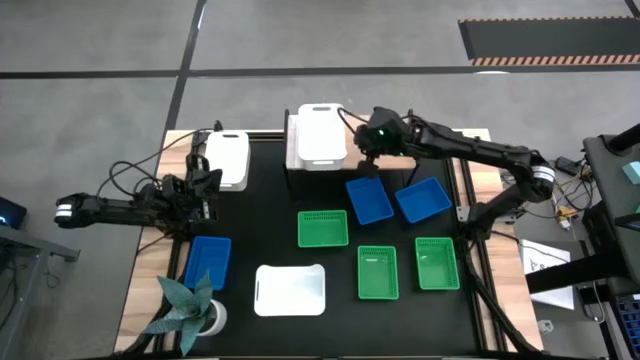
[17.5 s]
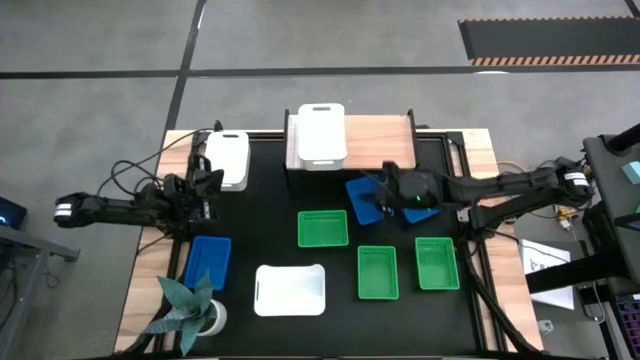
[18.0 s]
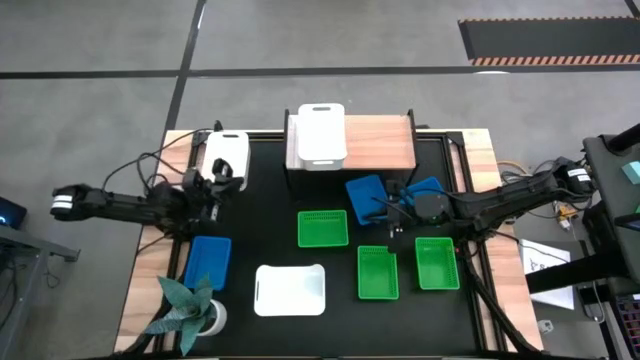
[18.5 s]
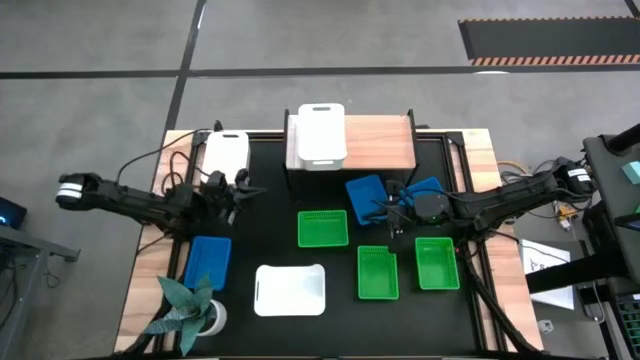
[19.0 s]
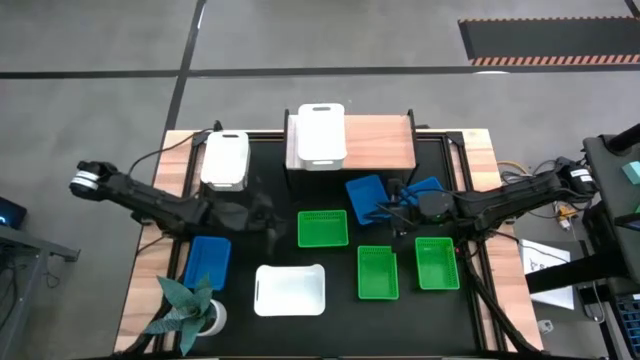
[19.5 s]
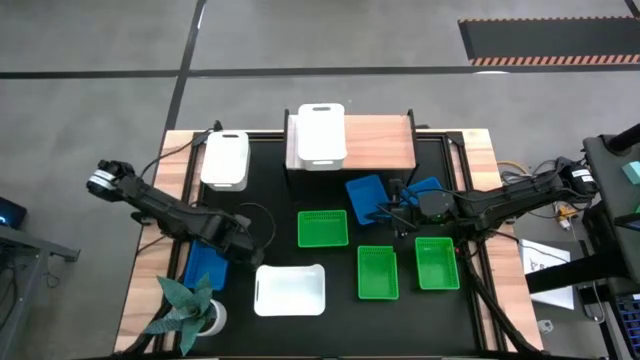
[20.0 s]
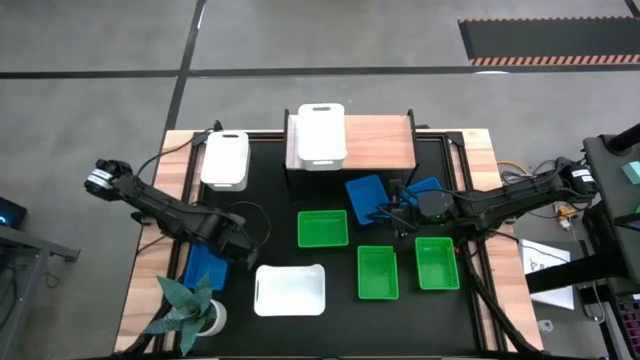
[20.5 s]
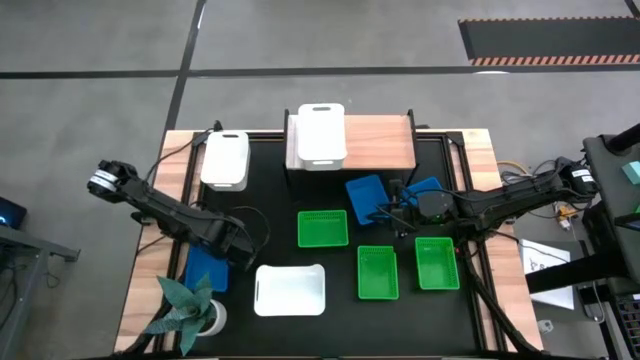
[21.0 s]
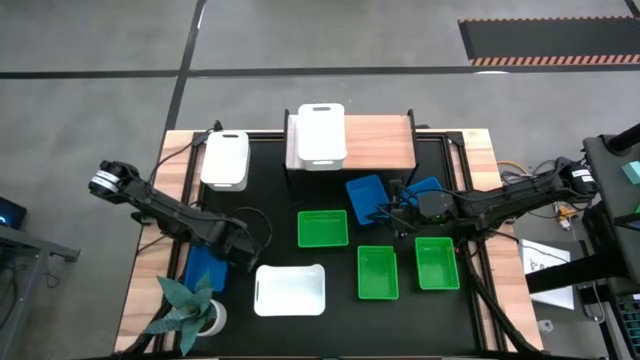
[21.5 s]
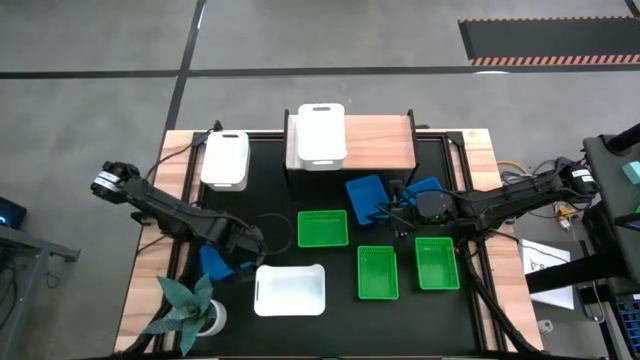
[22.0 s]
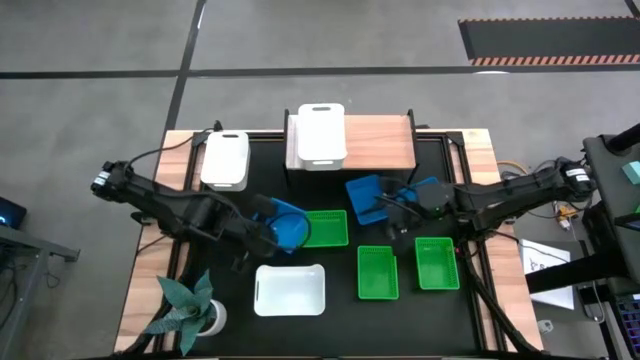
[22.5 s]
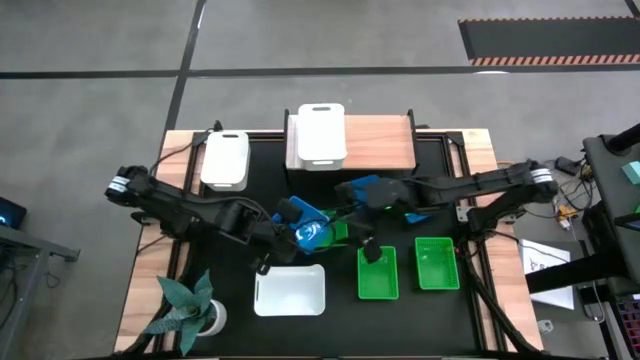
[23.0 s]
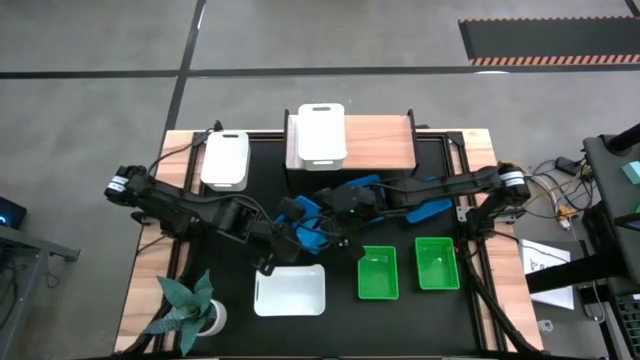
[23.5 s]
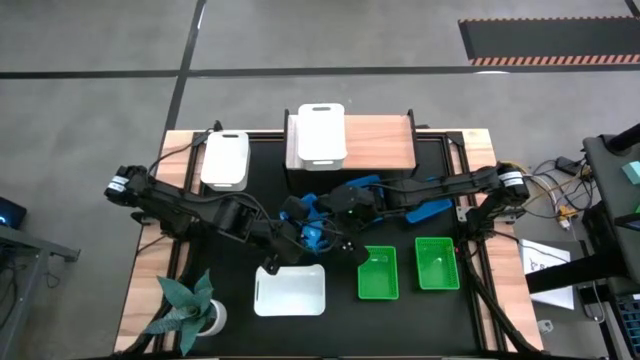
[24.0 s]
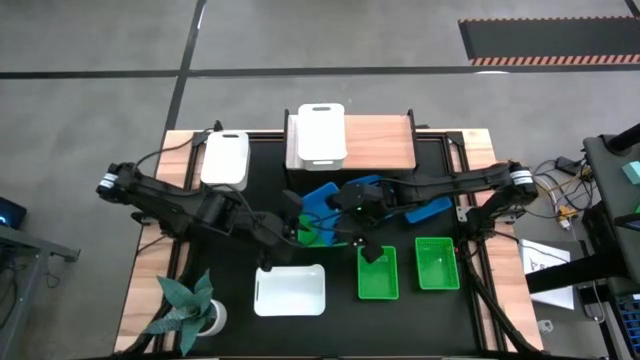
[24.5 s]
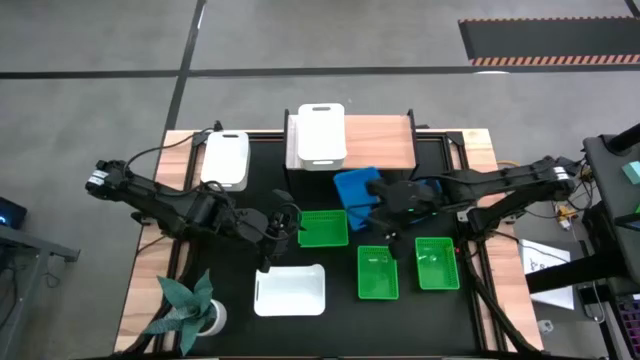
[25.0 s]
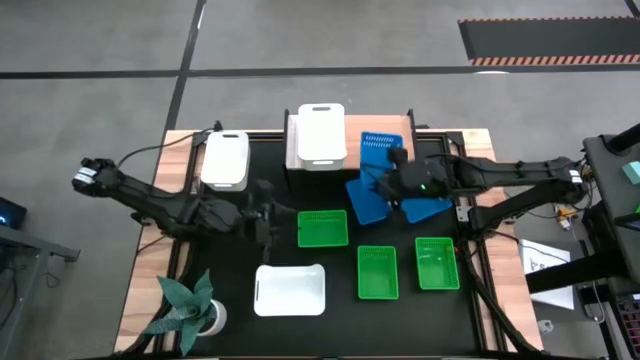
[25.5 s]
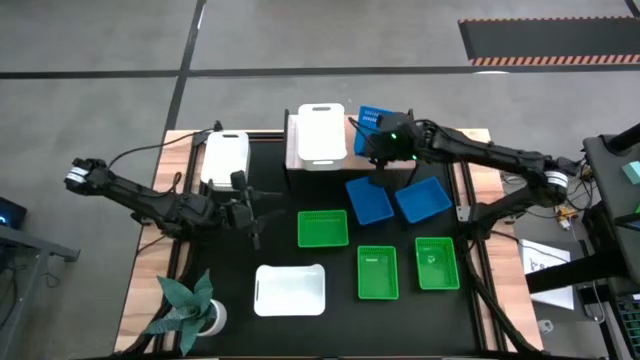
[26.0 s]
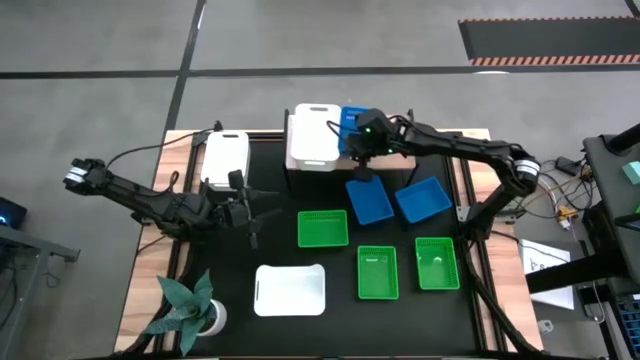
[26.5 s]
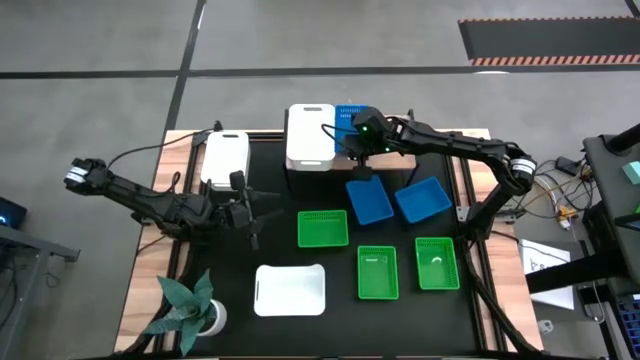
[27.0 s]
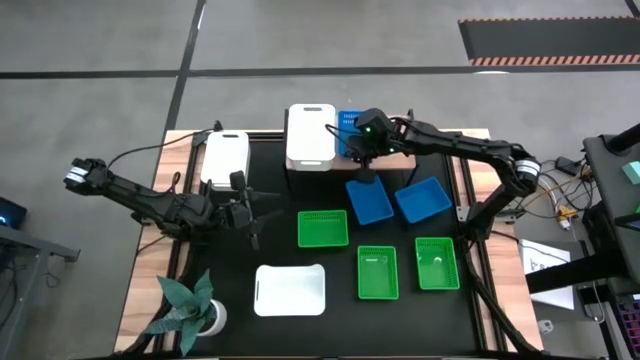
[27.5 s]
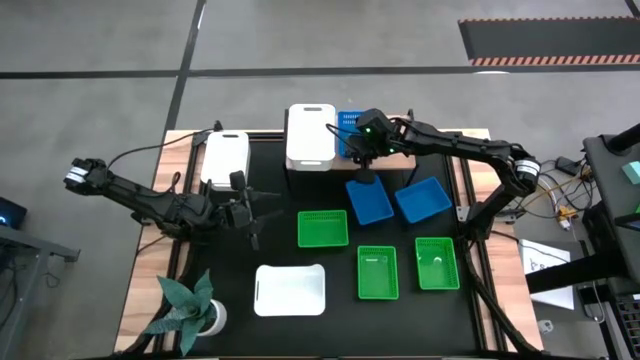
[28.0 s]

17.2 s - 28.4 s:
Task: Stack baskets on shelf by color
Put the left blue bin on the shelf

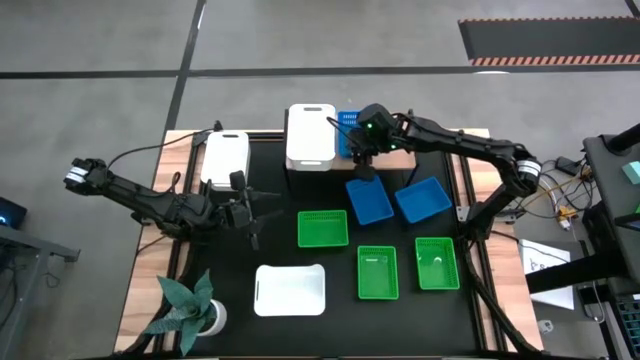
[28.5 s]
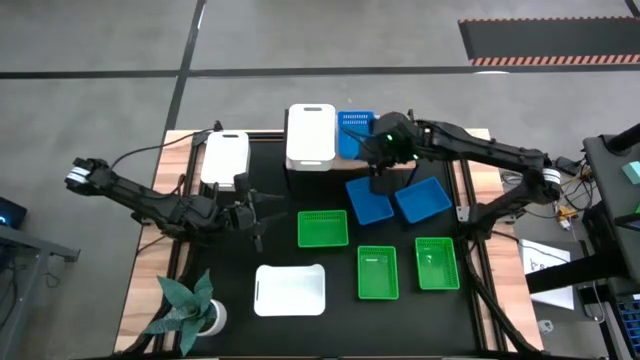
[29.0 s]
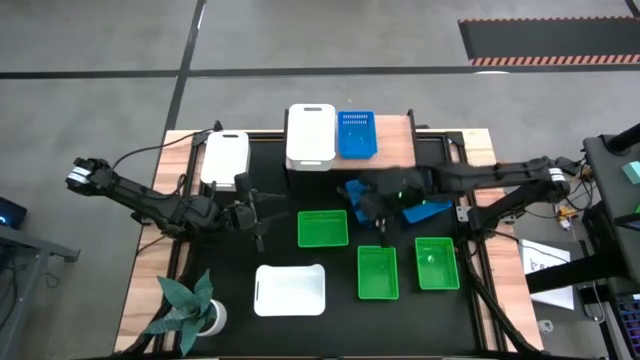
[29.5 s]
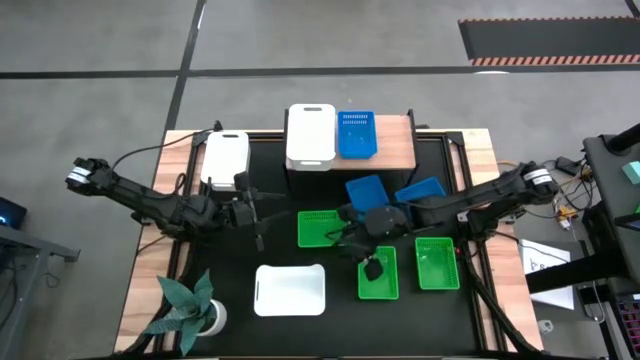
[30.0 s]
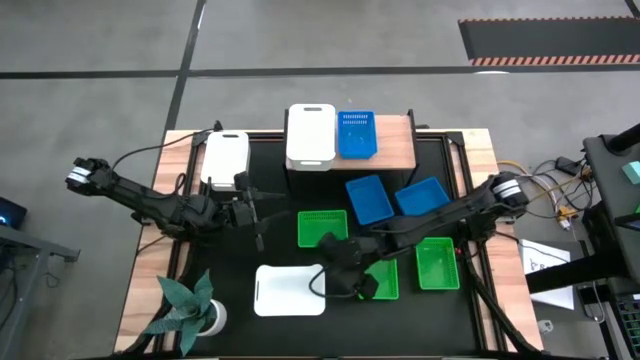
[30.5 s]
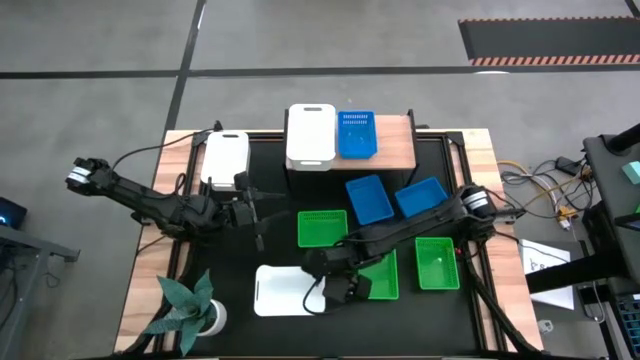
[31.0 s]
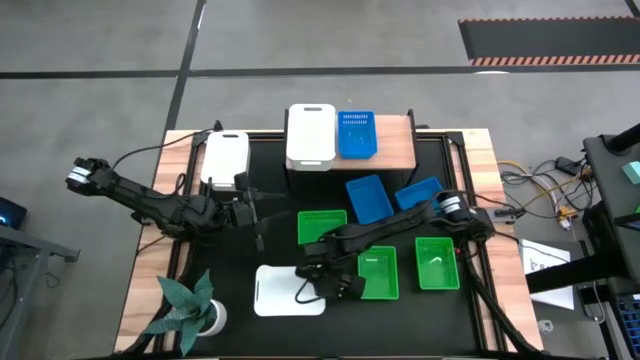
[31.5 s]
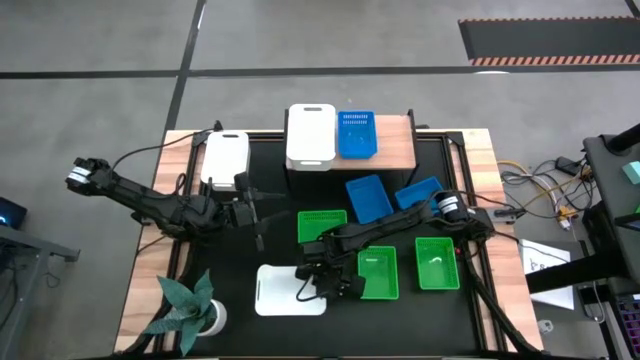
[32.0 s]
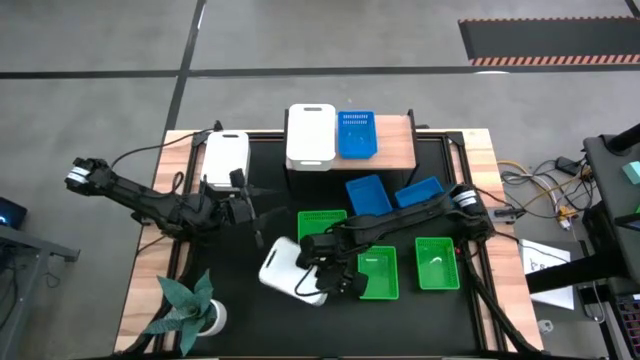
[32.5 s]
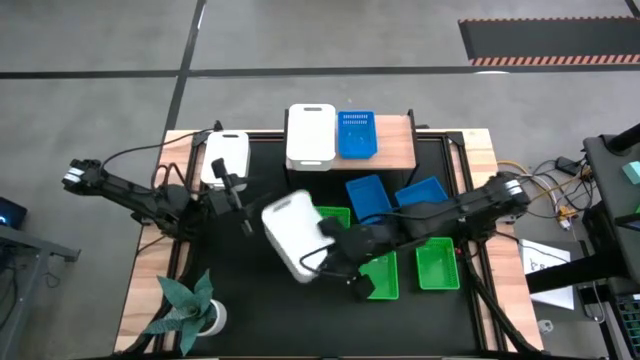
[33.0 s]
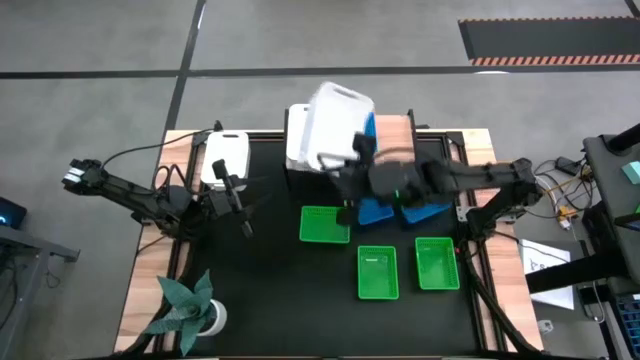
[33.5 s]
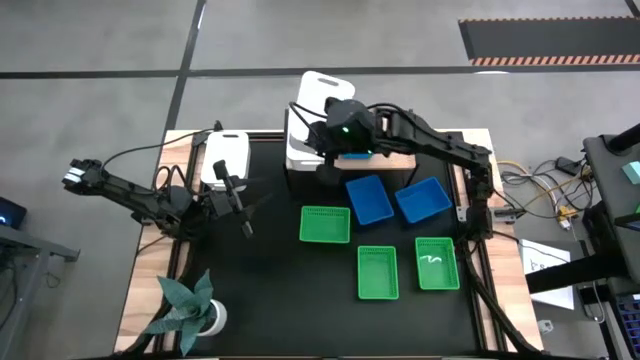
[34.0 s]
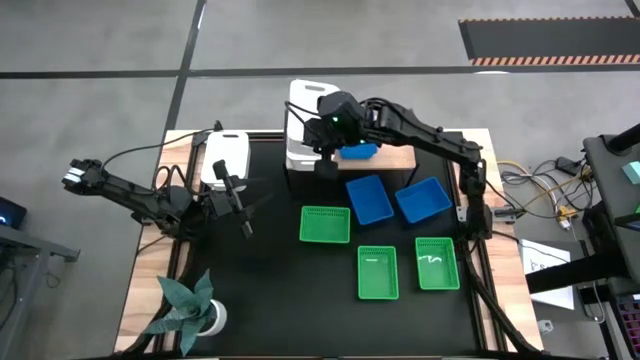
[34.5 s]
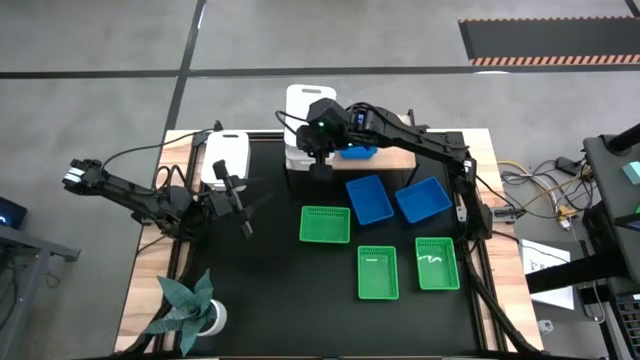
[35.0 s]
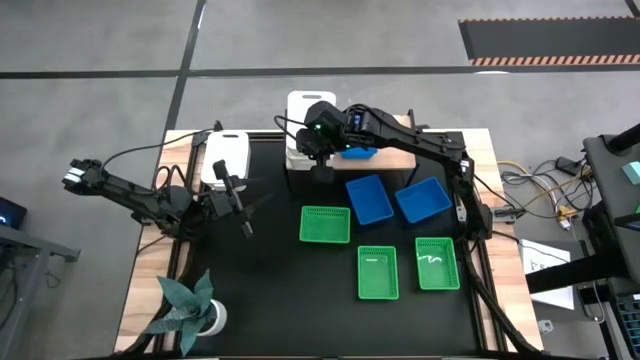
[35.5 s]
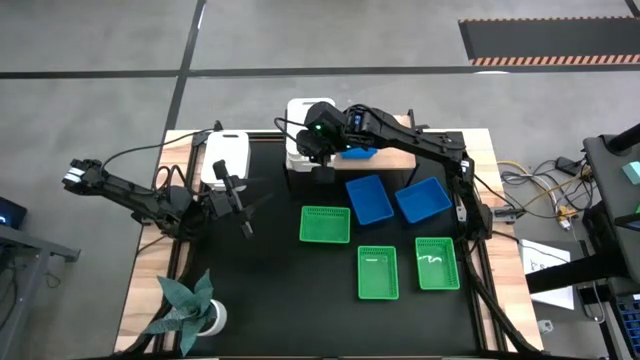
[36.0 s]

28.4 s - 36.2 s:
Stack the bottom white bin on top of the white bin on the shelf

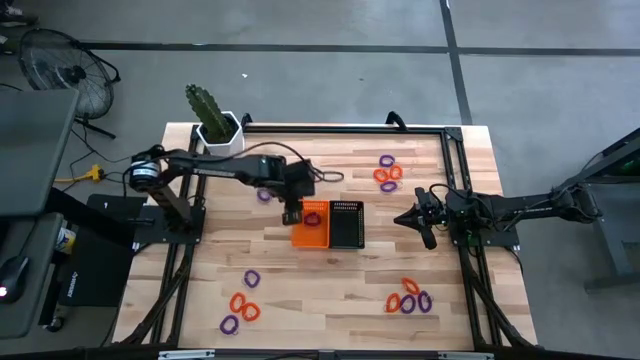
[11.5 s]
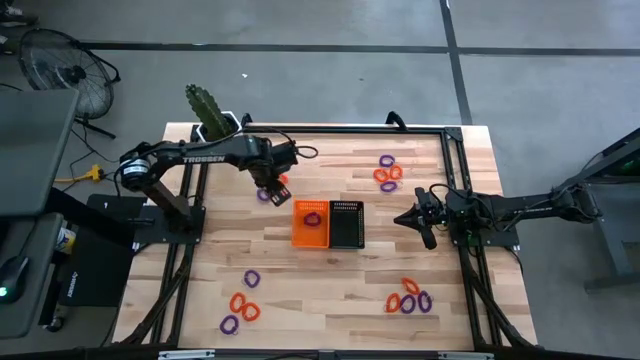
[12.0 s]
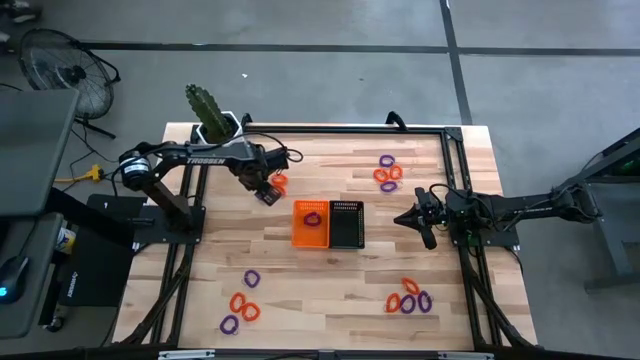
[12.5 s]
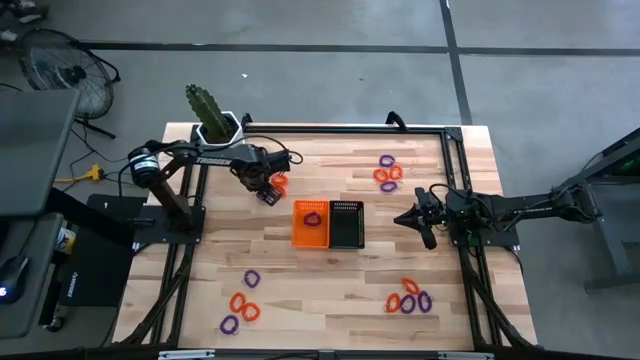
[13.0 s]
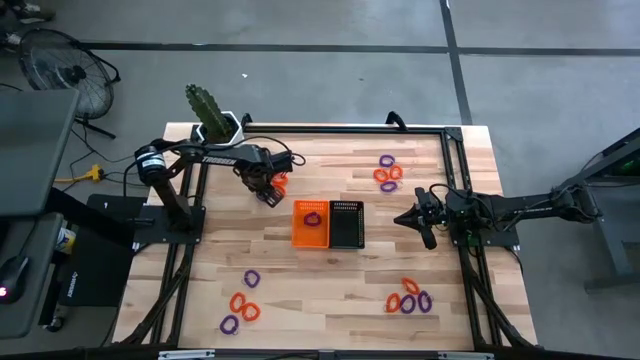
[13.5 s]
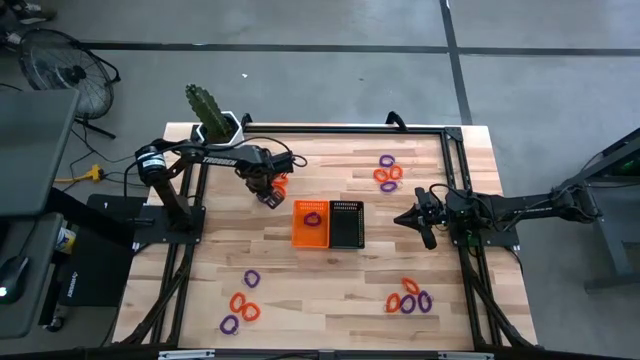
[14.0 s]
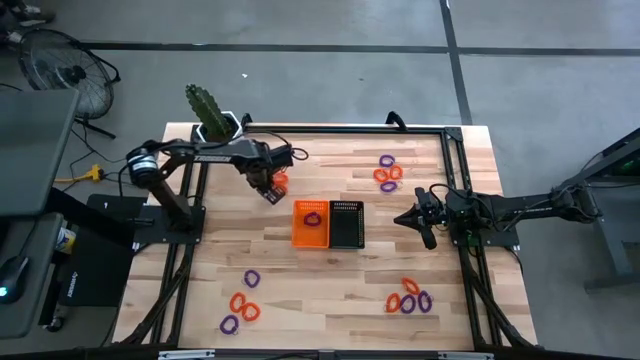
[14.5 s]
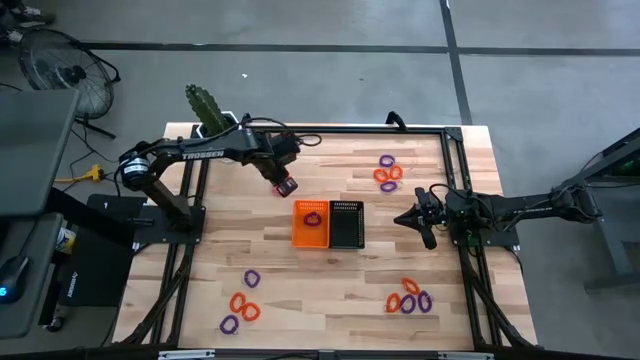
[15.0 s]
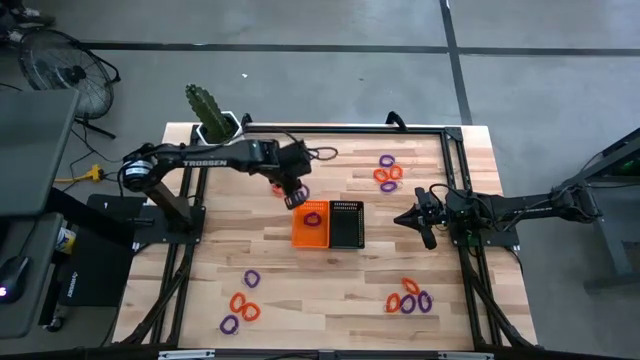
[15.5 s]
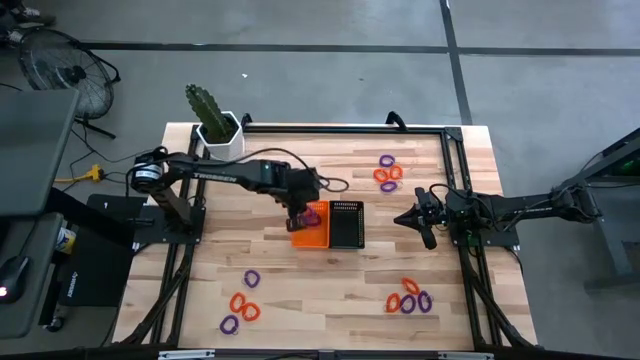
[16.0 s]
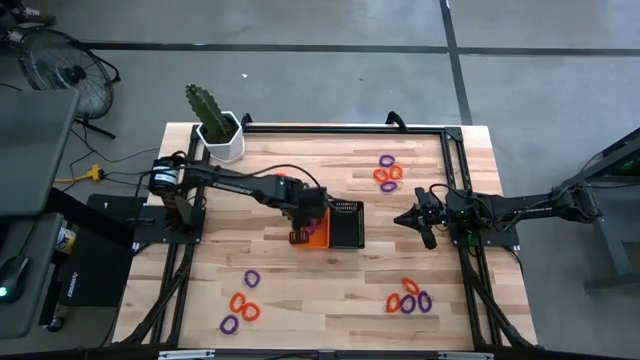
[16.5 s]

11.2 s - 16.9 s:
Task: Sort spring keychains
Put the violet spring keychain into the orange bin
